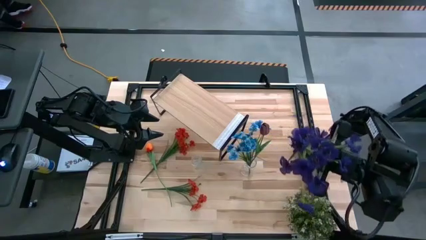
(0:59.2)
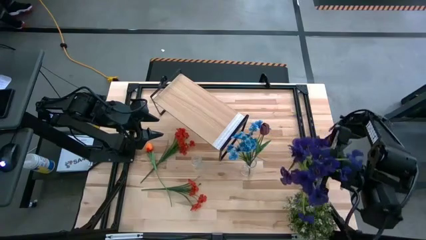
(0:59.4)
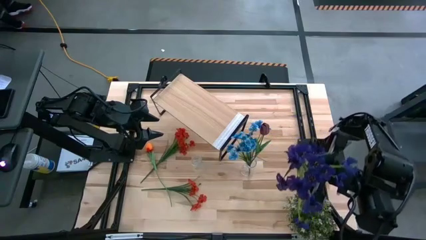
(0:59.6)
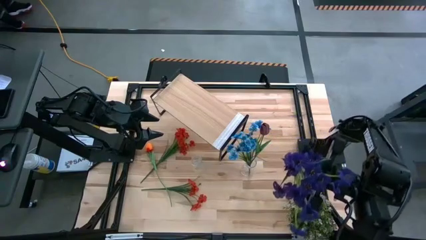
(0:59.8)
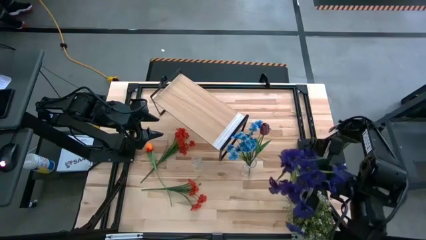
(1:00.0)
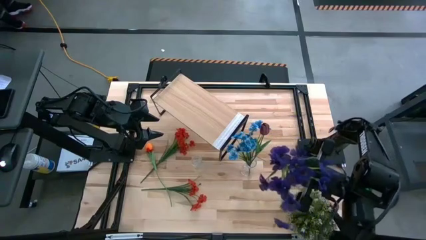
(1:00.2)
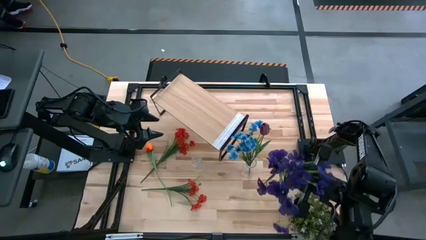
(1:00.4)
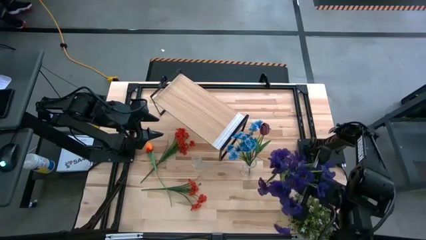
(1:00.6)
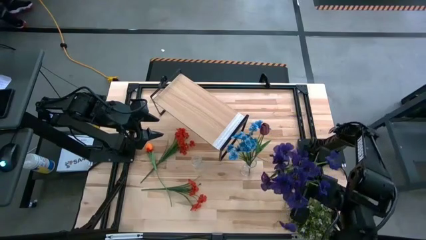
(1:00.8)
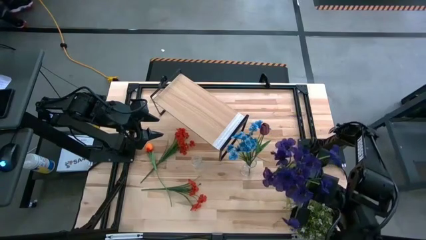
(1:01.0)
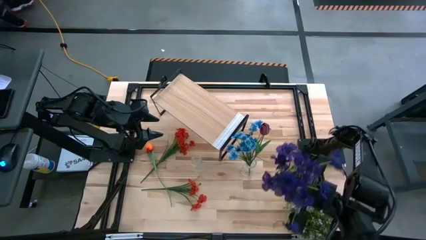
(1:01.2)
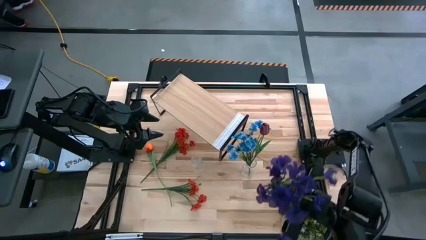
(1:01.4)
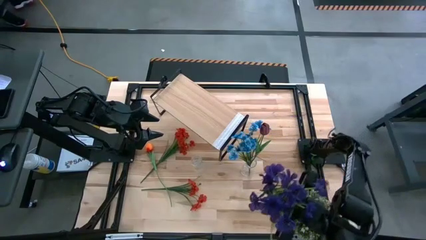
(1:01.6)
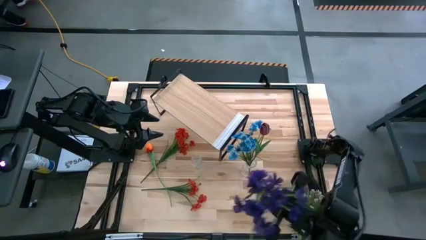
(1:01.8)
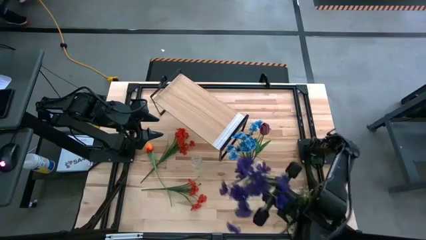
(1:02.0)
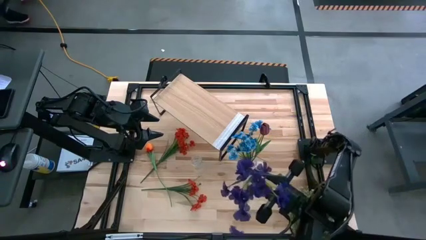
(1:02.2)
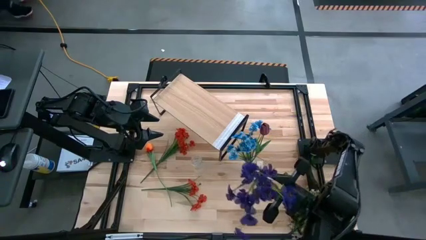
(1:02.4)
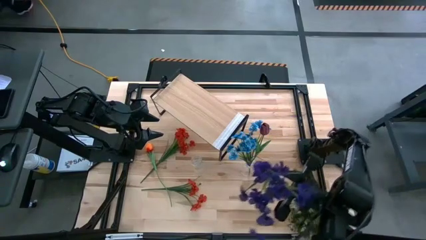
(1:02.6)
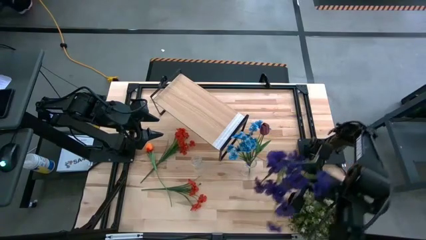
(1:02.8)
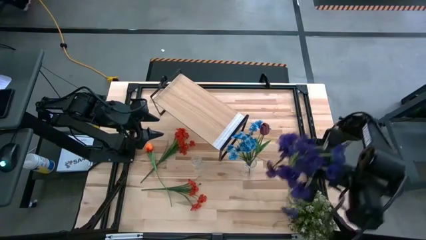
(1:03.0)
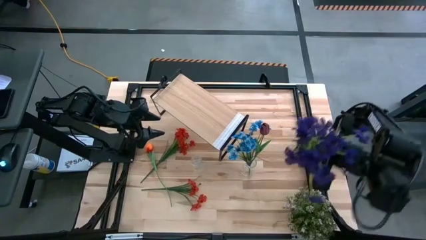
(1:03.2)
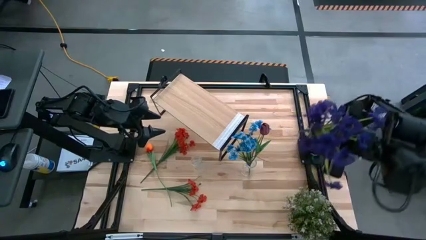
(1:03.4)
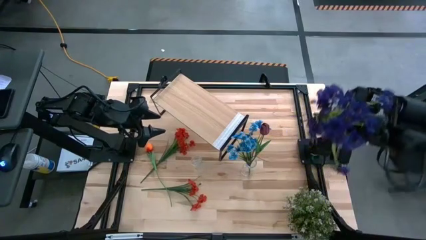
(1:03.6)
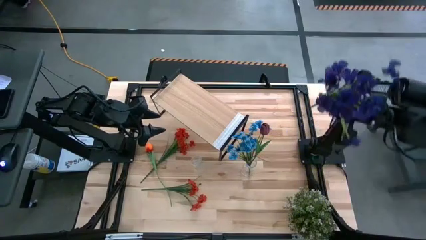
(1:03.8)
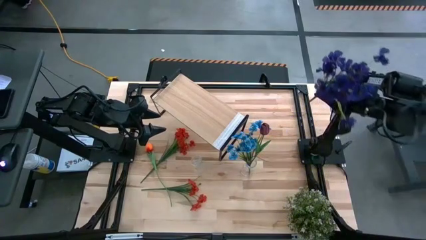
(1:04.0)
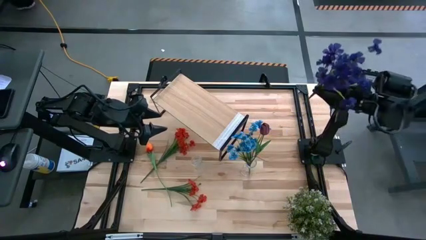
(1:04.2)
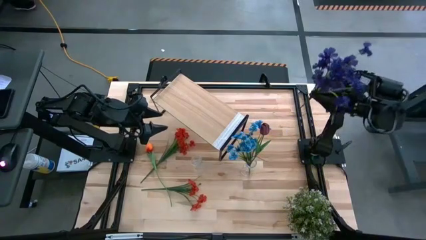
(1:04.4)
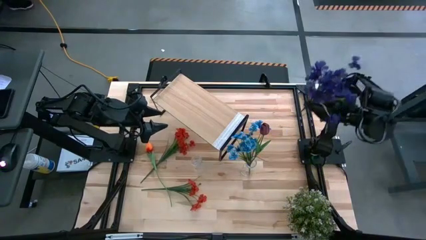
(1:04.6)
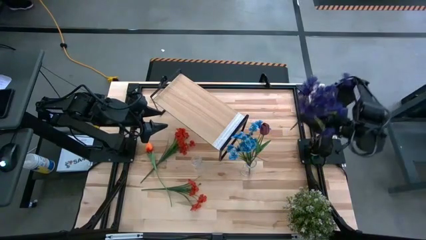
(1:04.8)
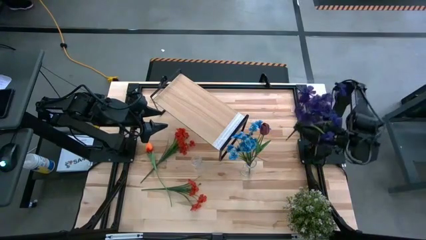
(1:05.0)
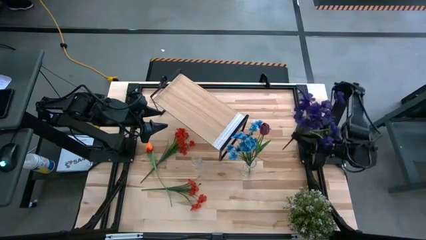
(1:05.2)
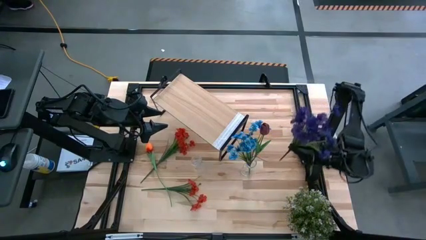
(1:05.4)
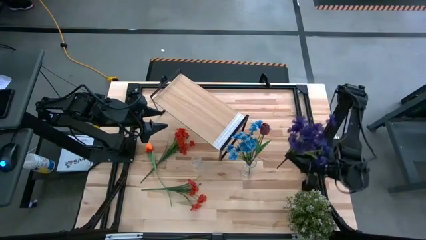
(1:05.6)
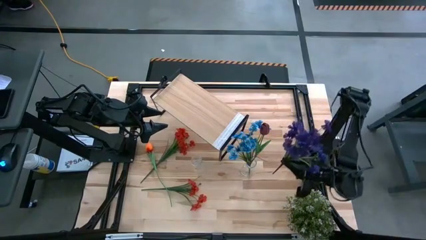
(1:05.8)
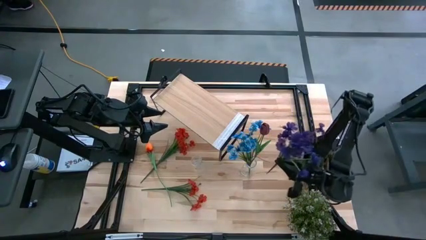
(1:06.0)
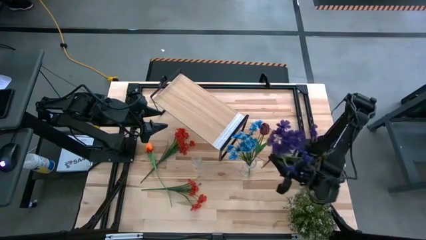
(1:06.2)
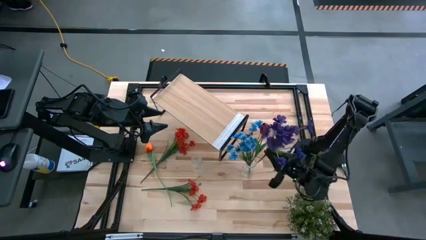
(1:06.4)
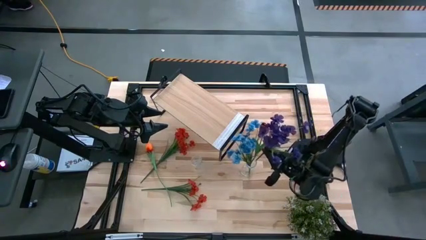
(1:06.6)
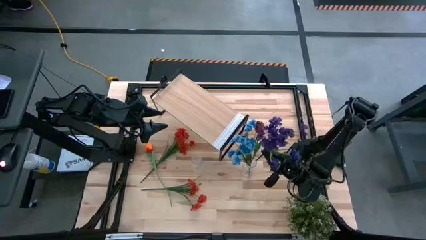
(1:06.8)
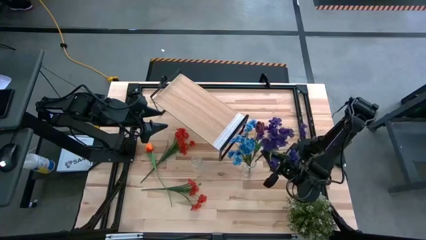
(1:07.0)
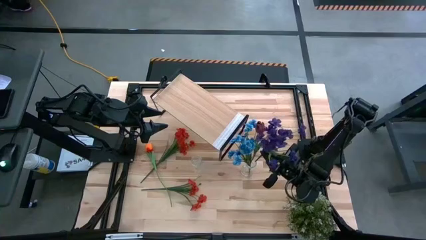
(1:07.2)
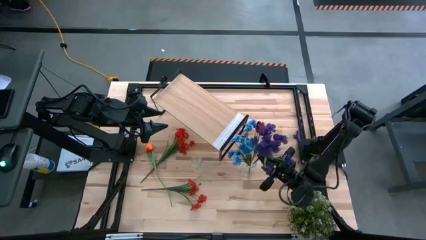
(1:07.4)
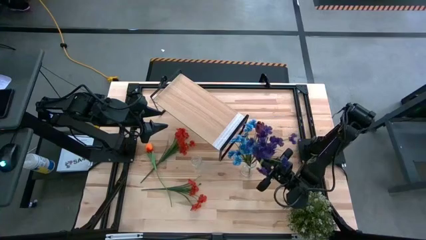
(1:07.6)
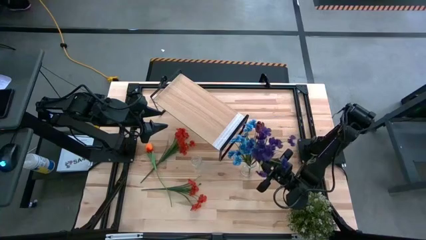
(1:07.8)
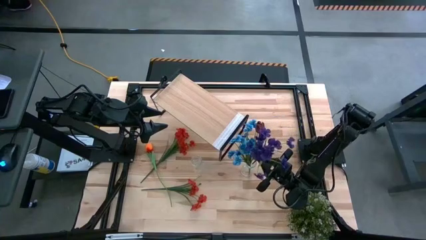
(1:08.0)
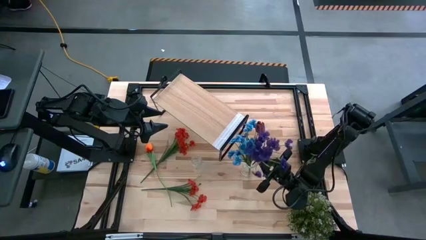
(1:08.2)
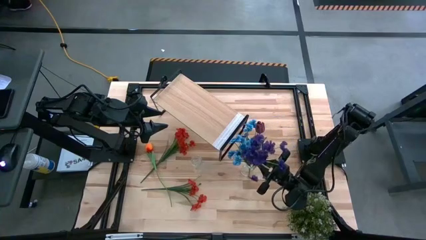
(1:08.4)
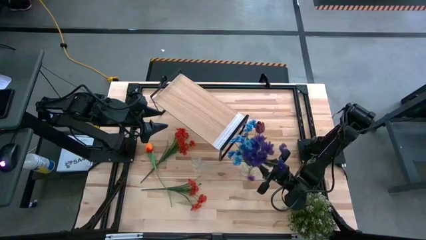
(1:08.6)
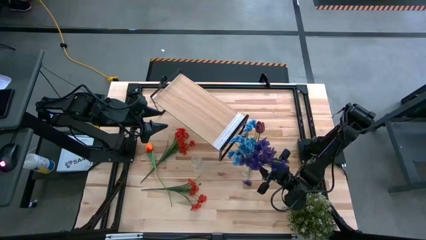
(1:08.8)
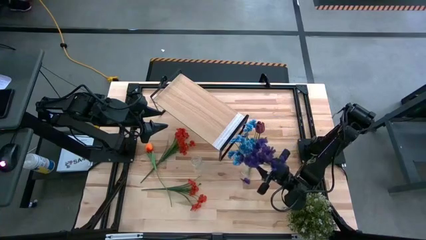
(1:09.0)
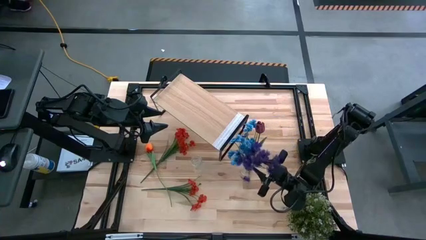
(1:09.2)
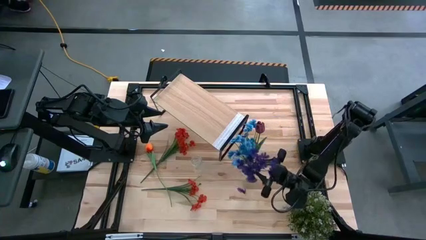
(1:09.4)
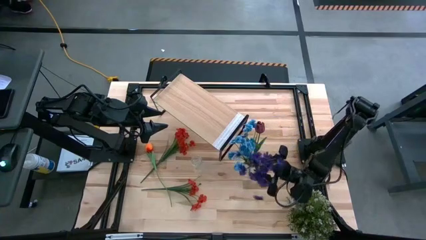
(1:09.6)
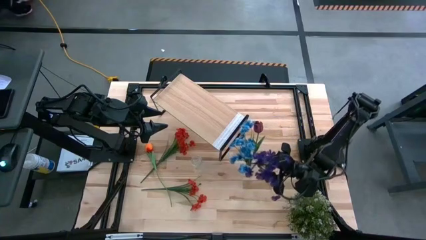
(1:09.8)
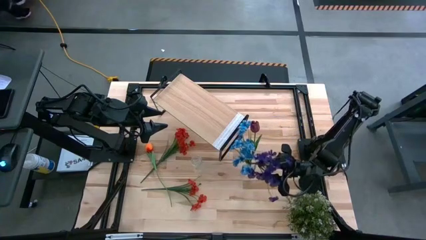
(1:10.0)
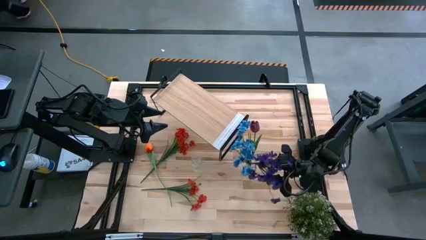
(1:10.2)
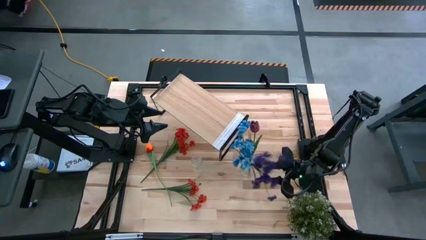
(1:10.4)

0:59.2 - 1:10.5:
Task: Pick and place flowers into a vace then onto a shelf
Put the violet flowers into the right transparent vase

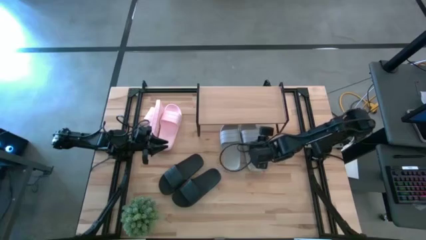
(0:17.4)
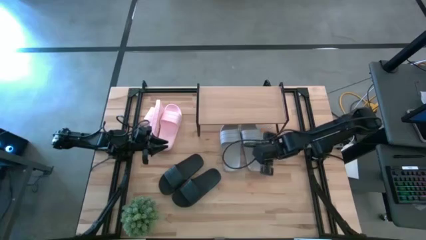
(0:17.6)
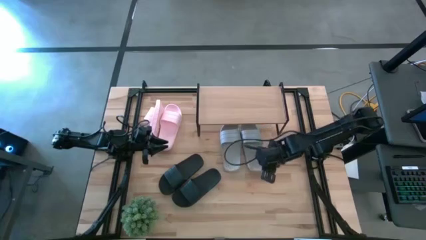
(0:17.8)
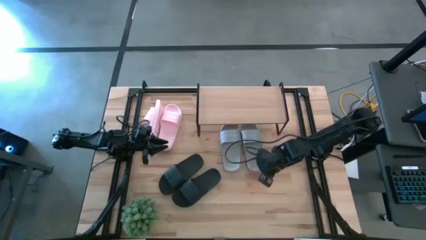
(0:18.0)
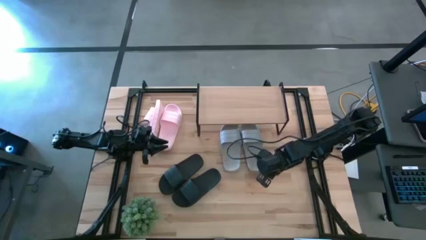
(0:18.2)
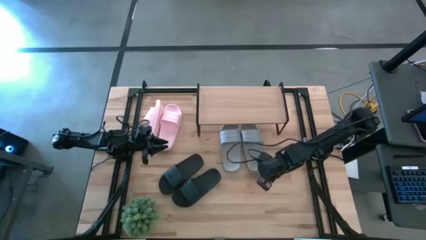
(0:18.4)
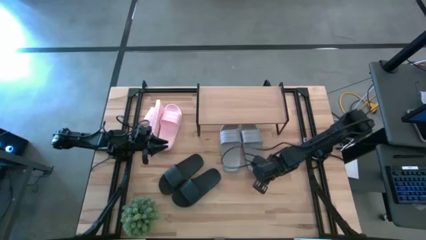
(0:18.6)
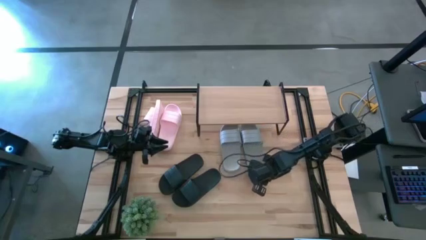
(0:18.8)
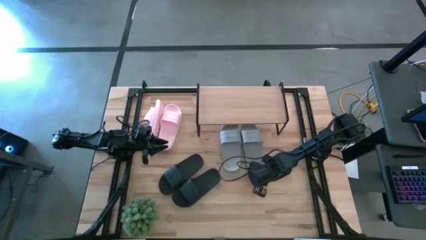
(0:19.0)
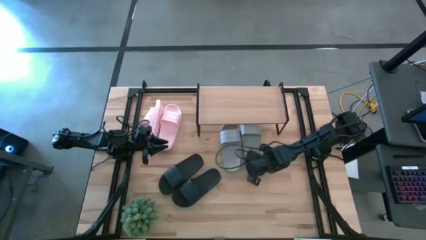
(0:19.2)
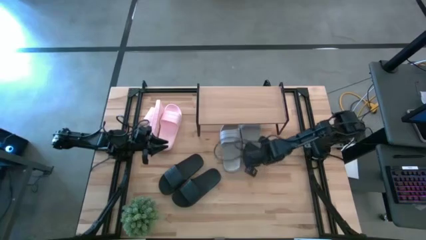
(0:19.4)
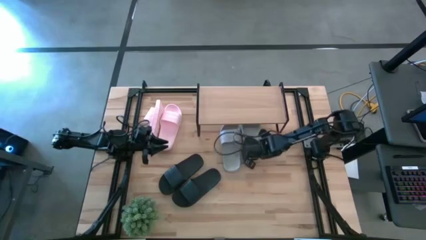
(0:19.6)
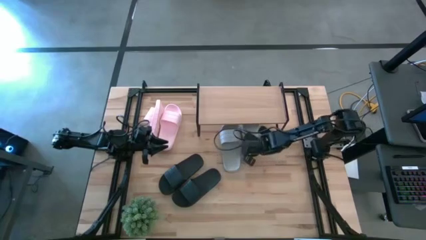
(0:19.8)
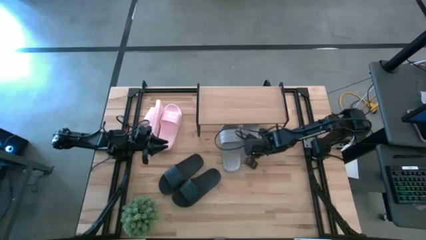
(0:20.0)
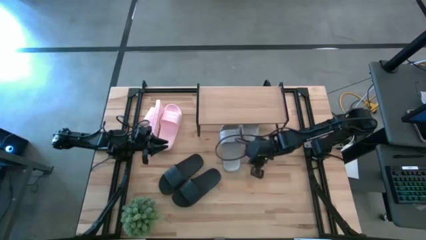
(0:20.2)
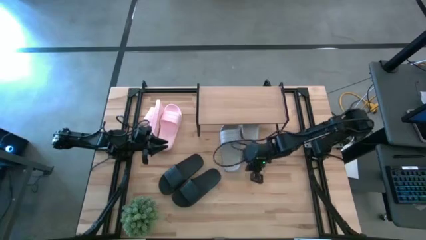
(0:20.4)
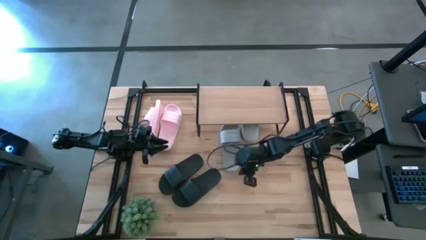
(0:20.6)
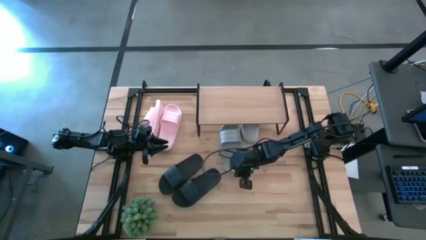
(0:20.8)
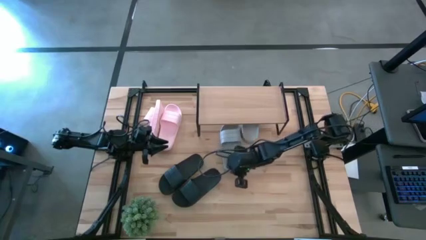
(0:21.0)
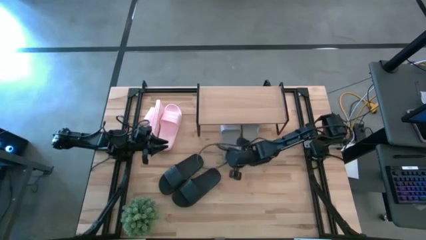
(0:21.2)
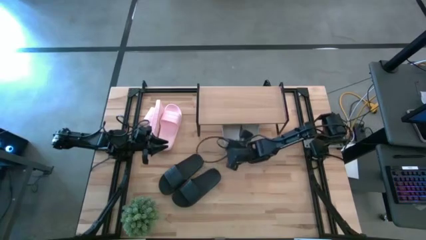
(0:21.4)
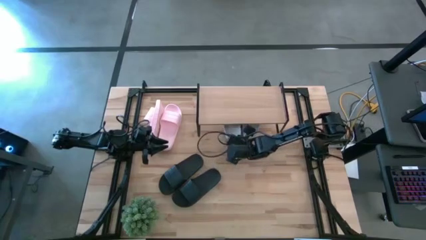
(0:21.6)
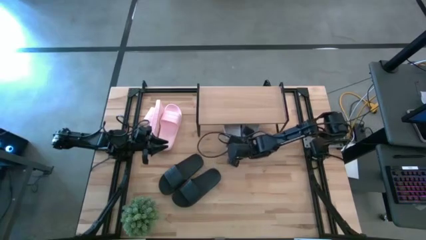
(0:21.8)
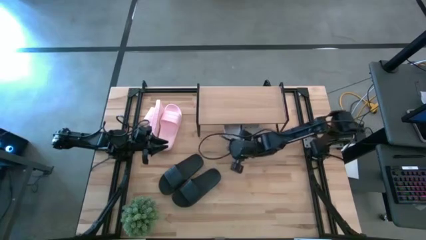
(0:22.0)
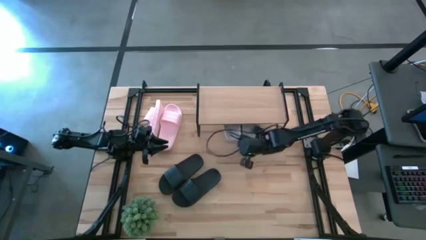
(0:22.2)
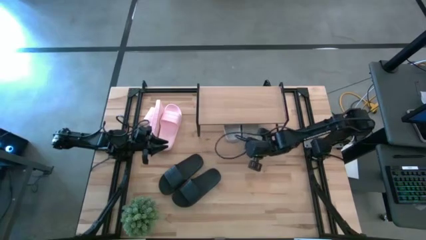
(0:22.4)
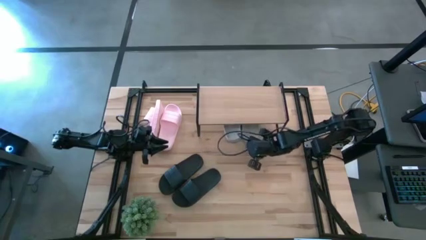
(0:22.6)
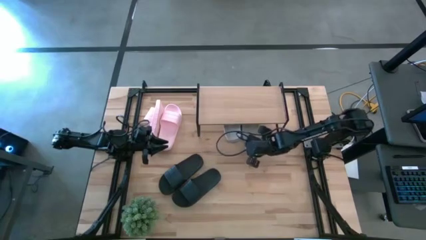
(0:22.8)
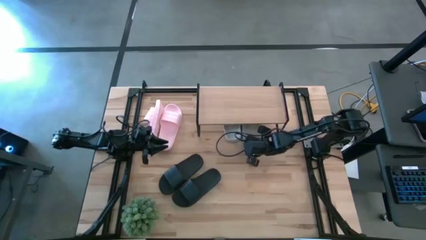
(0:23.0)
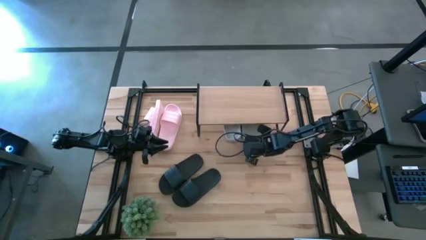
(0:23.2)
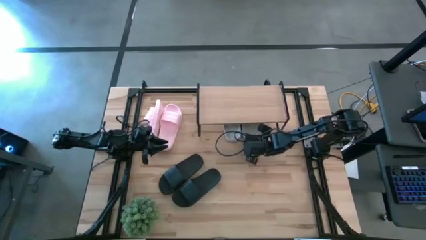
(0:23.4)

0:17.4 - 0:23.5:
Task: Pick and place slides into the shelf
Adjust the gray slides under the shelf
